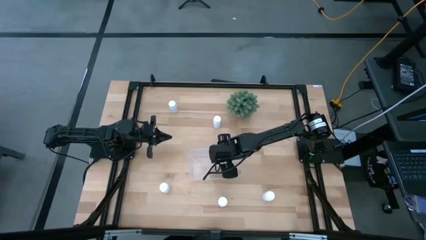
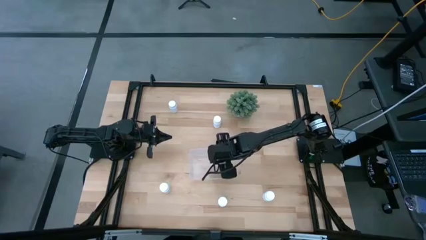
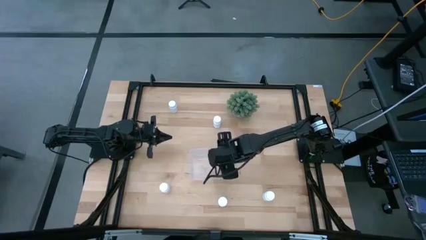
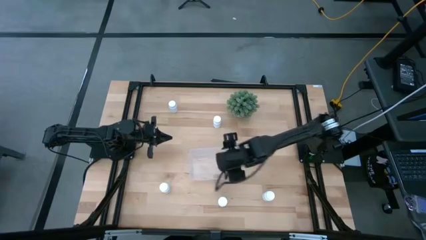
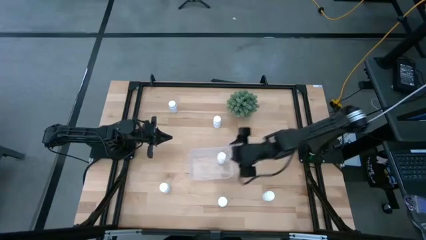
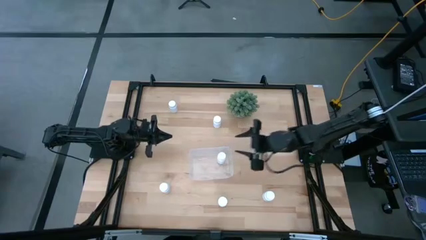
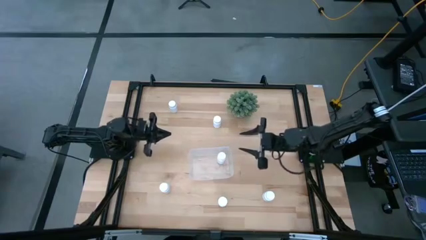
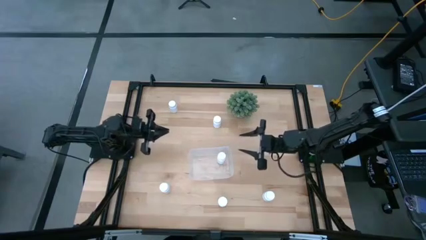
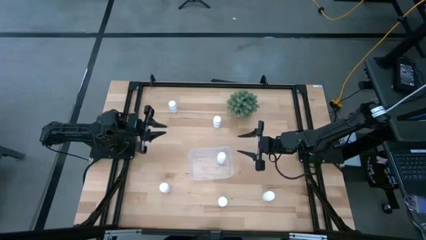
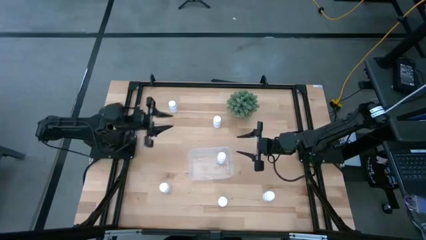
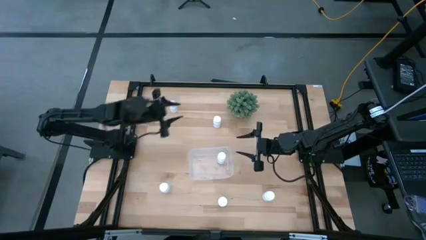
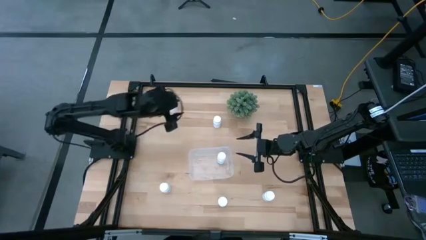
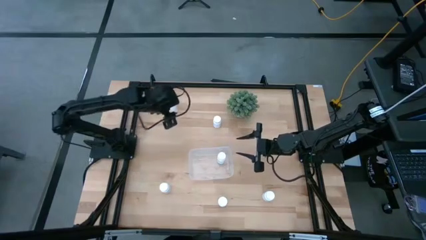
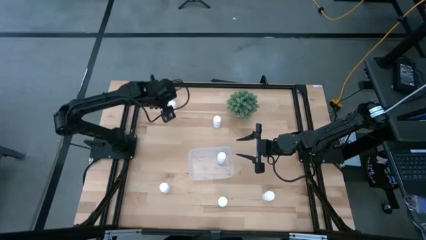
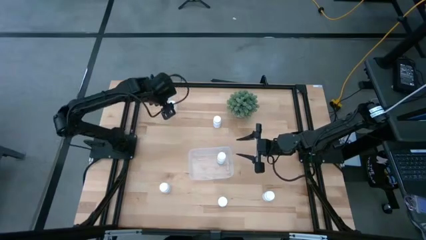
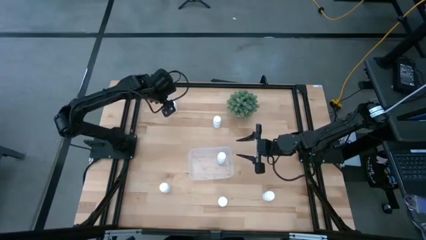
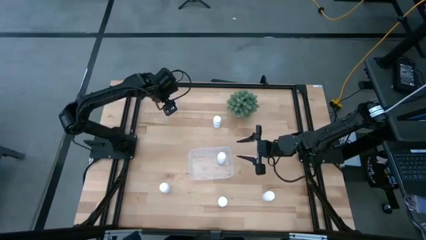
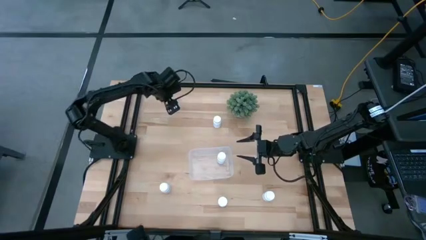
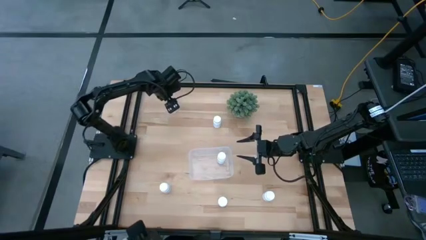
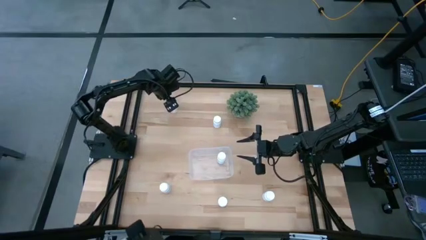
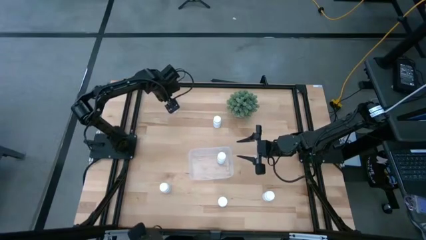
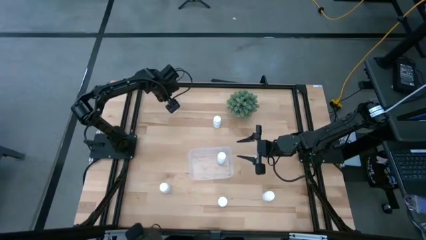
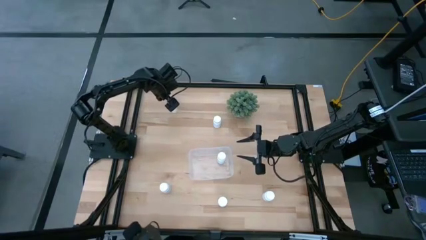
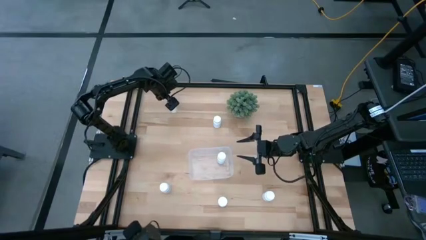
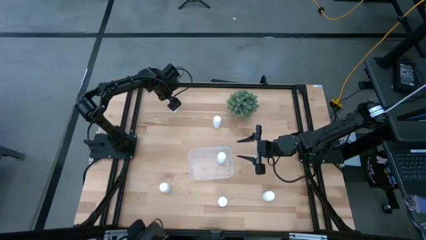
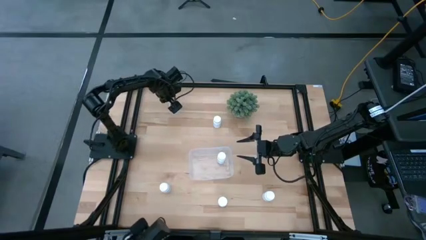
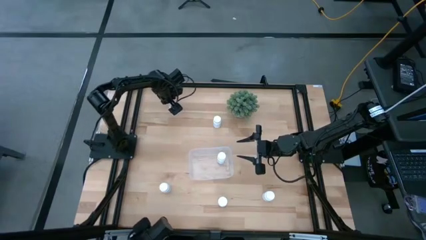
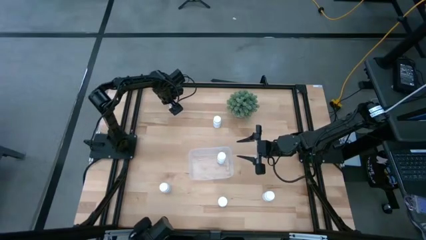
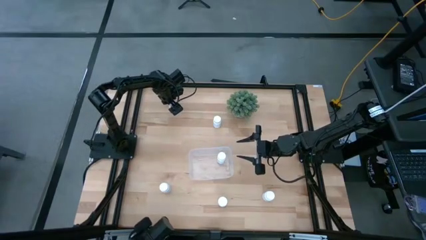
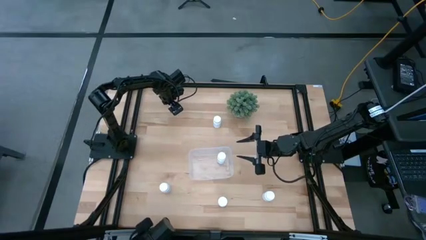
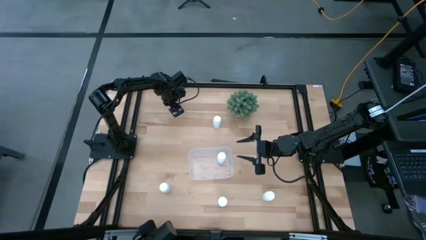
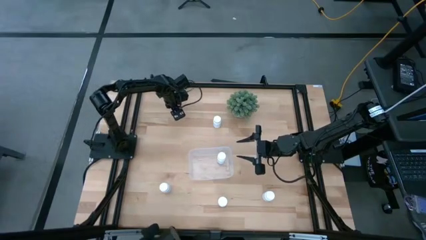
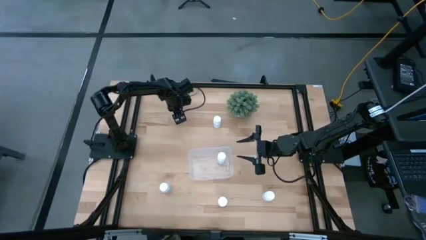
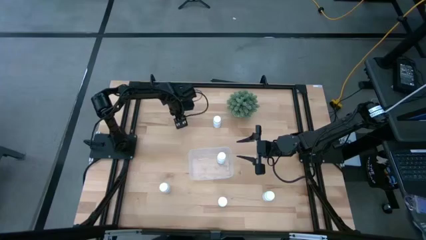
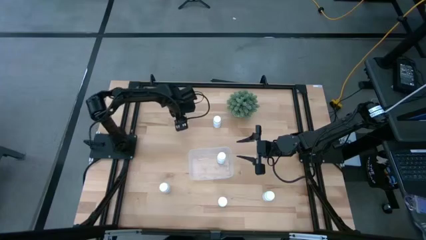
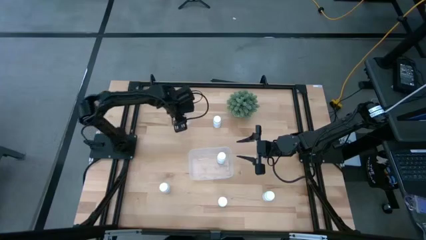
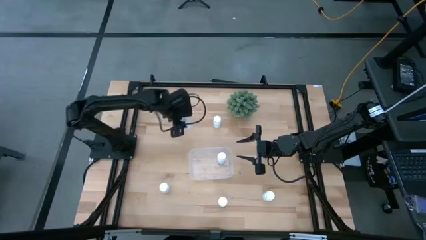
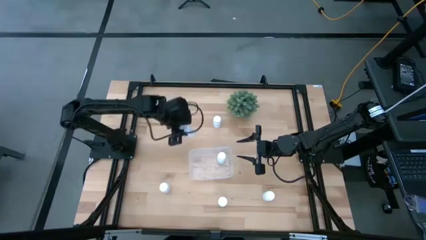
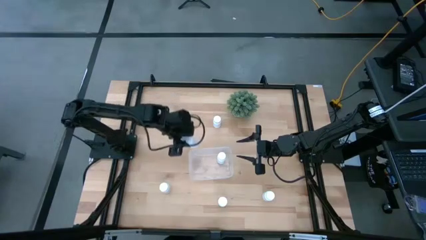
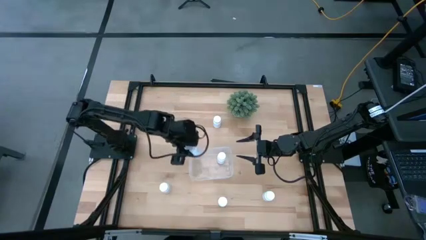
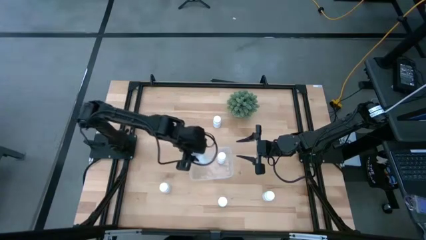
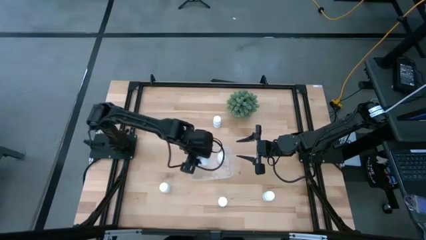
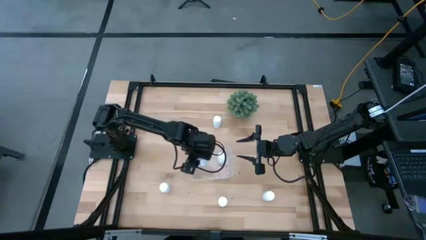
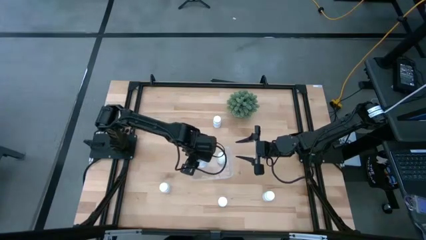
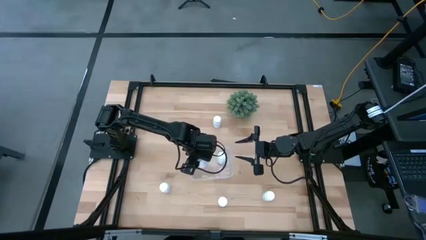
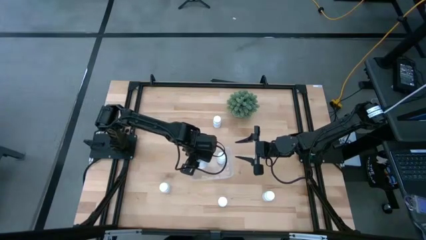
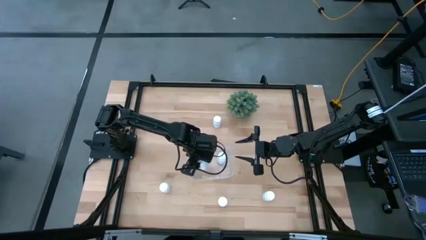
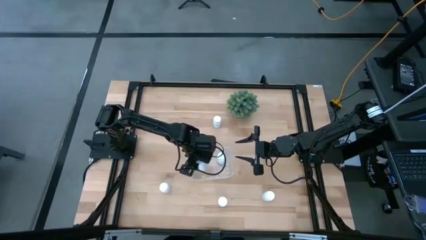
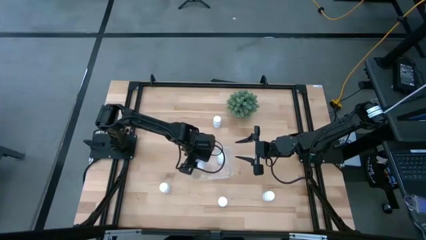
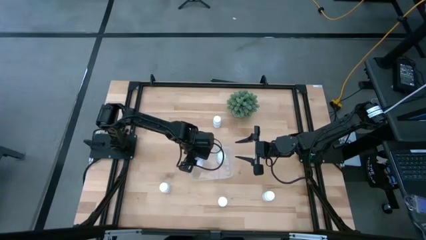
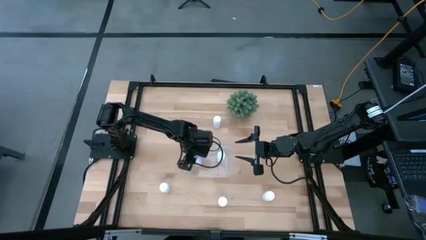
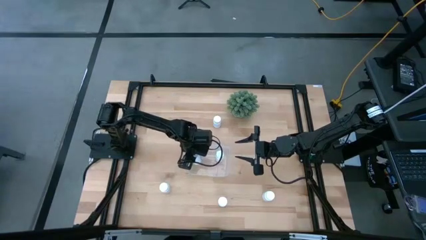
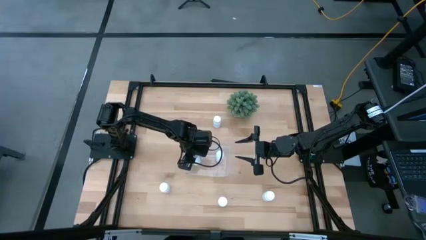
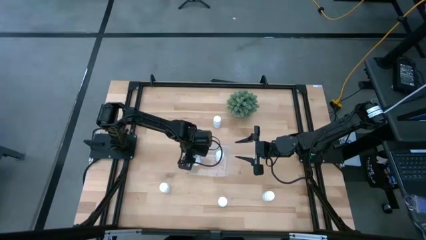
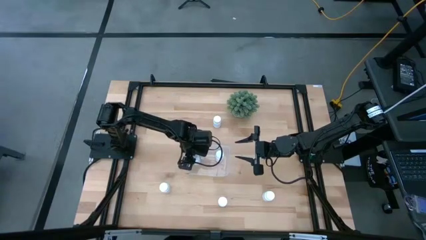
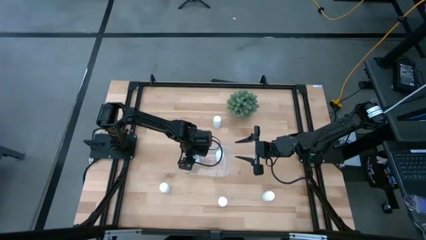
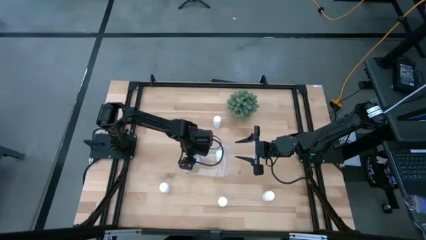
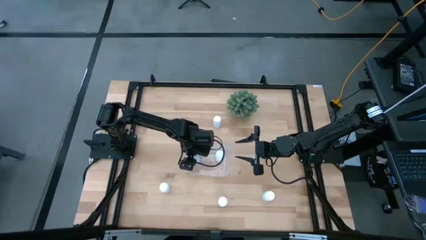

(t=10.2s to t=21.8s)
Task: Pick and place pill bottles into a basket
Put the white medicine bottle into the transparent bin

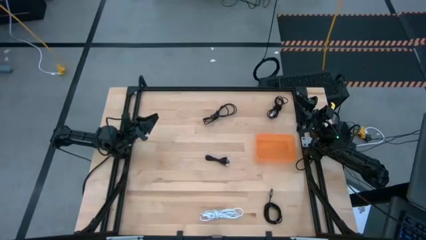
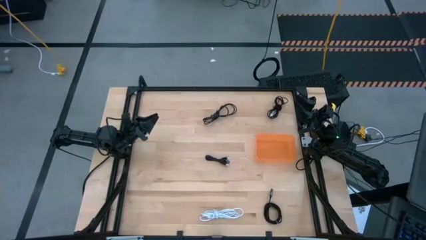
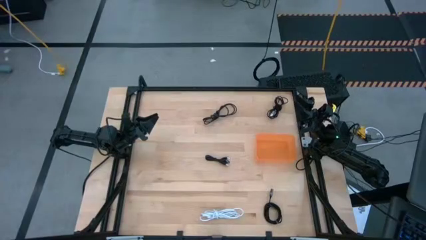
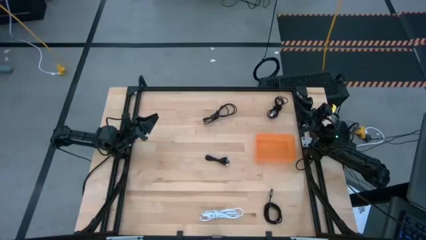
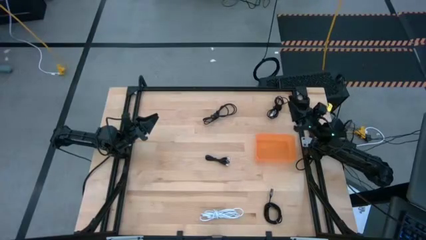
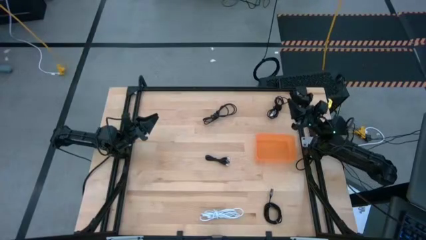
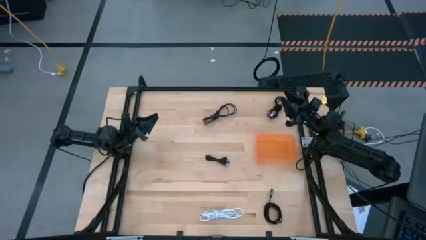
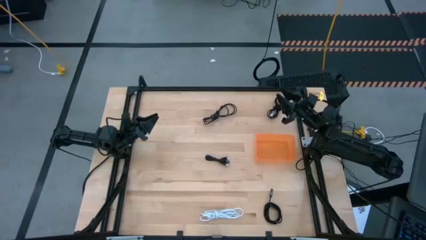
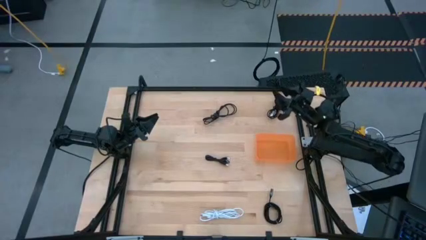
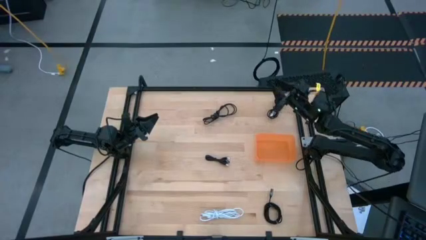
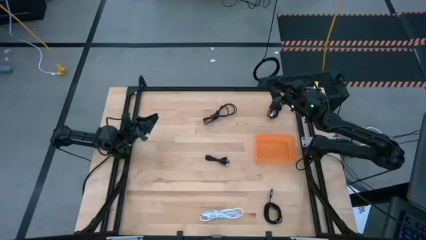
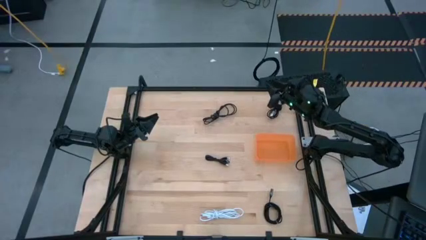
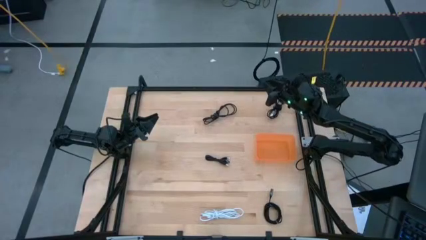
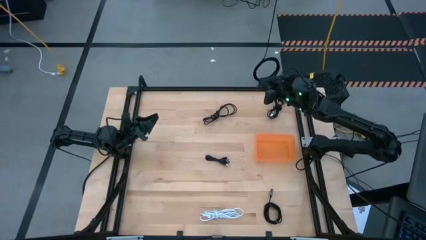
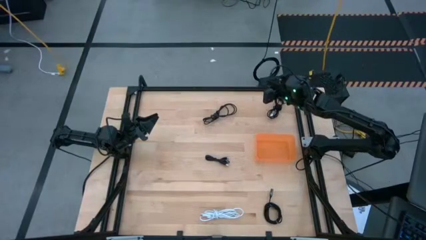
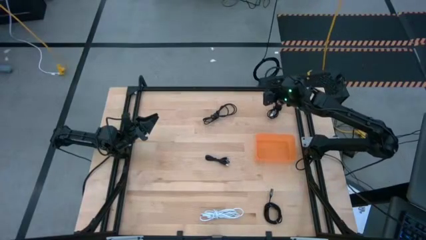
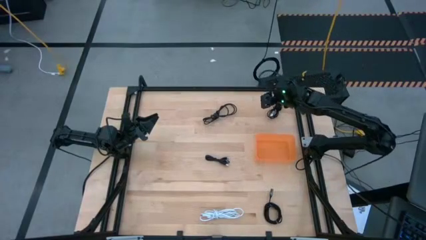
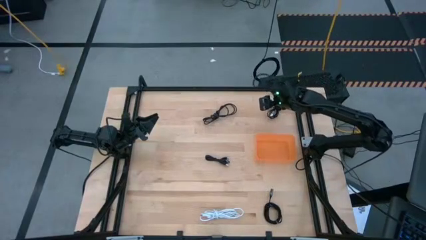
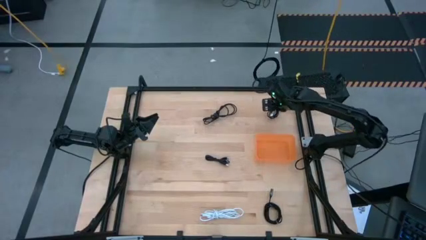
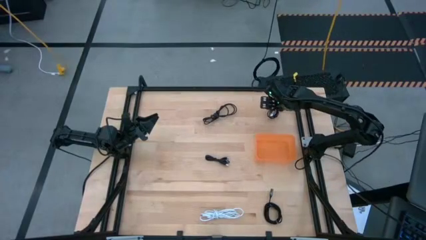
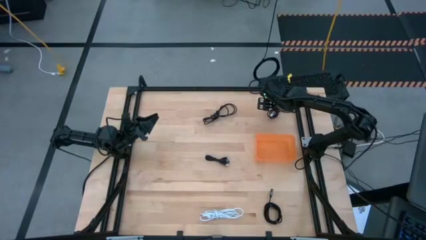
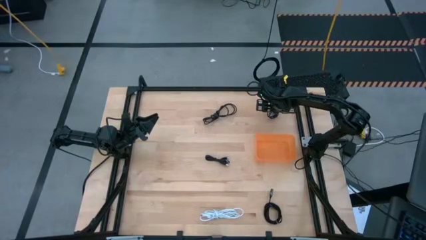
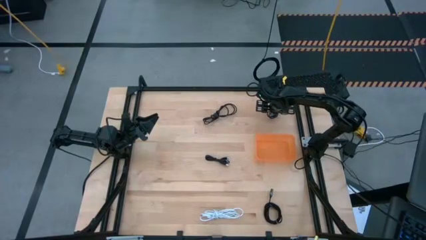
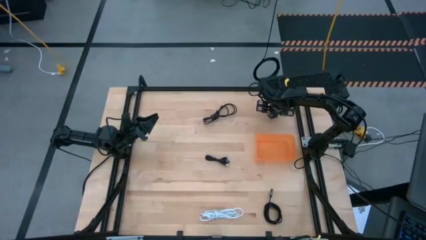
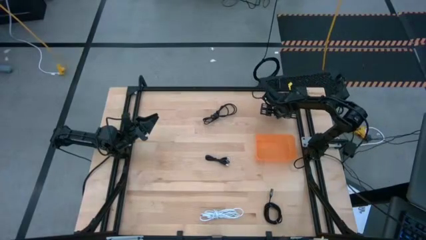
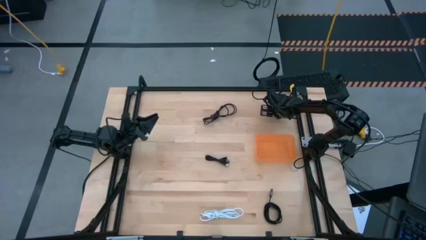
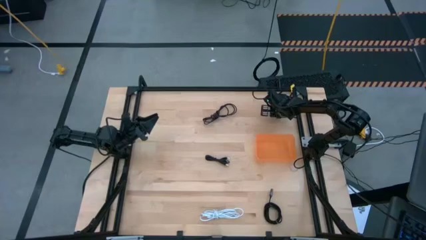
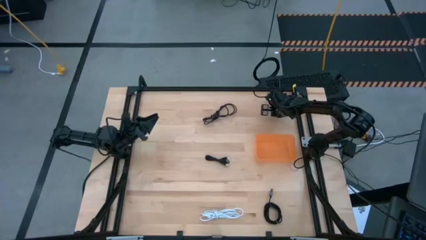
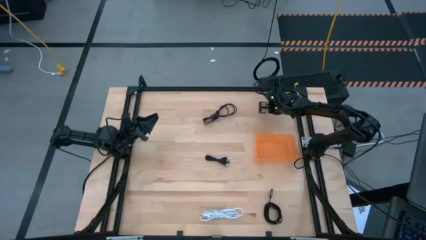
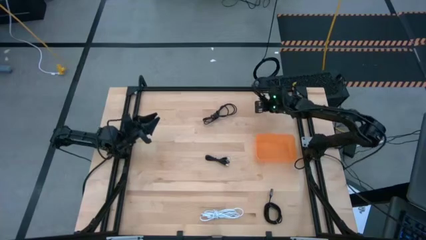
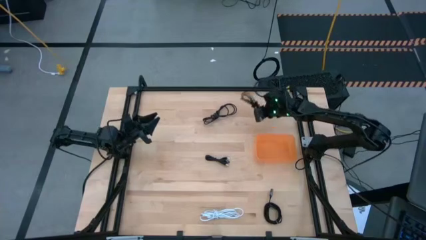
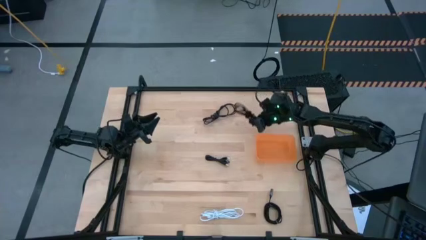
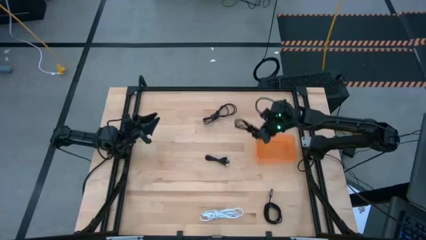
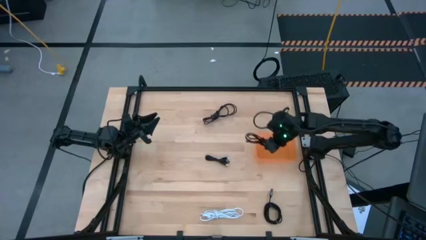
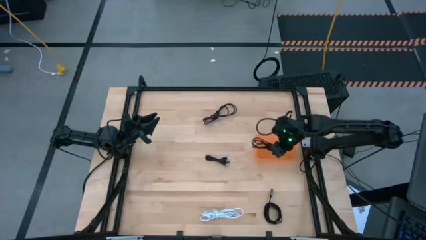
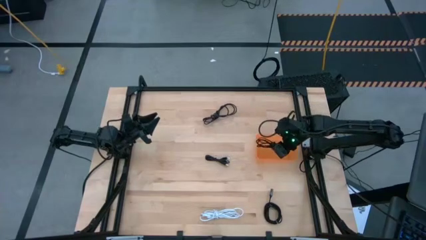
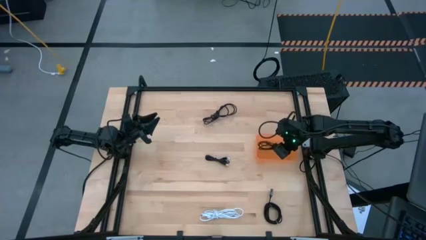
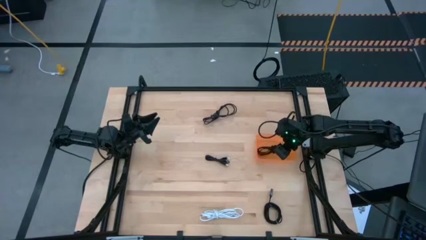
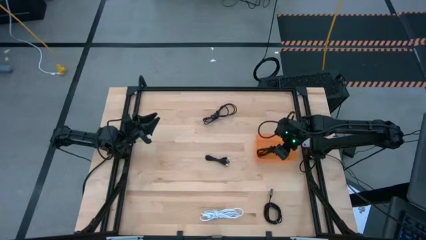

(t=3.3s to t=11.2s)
Task: Pick and place USB-C Cables
Put the black charger cable into the bin
